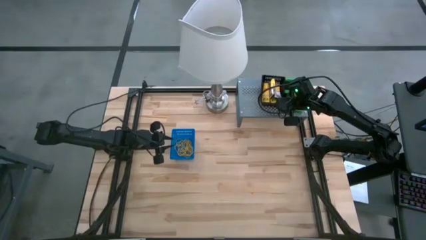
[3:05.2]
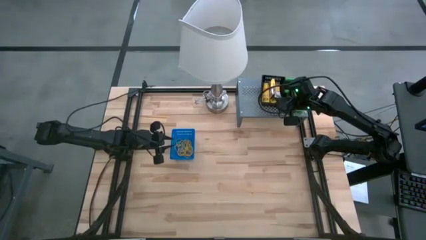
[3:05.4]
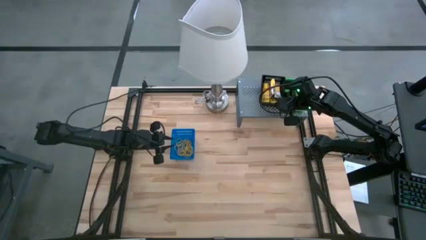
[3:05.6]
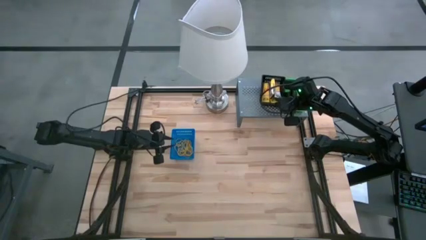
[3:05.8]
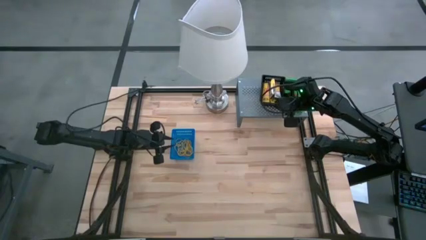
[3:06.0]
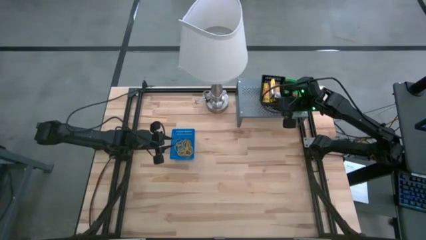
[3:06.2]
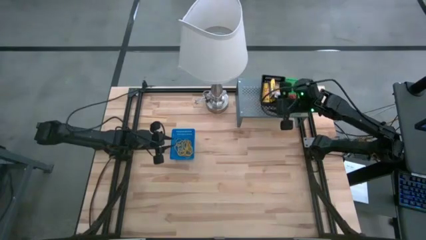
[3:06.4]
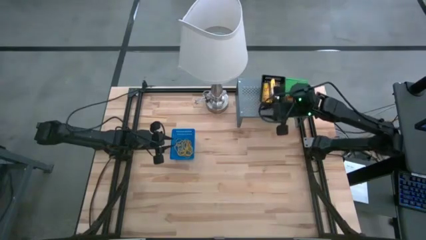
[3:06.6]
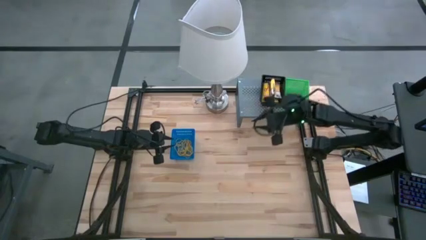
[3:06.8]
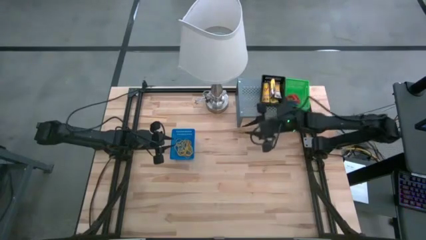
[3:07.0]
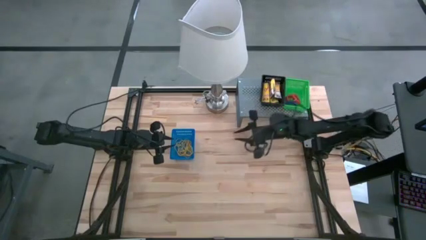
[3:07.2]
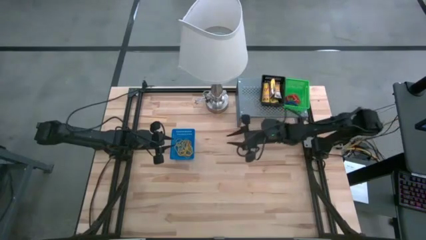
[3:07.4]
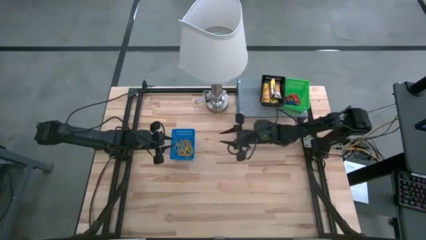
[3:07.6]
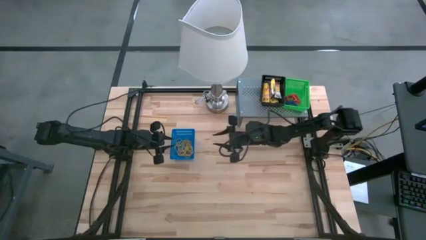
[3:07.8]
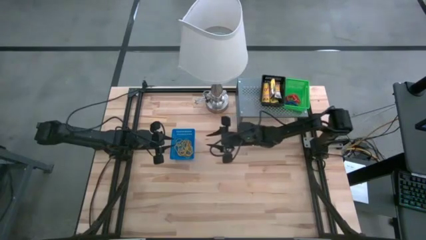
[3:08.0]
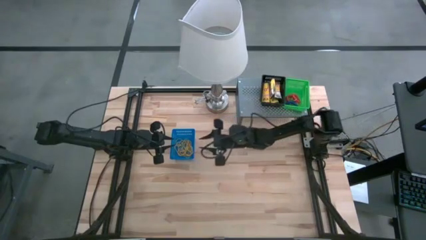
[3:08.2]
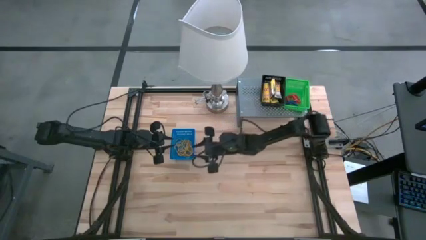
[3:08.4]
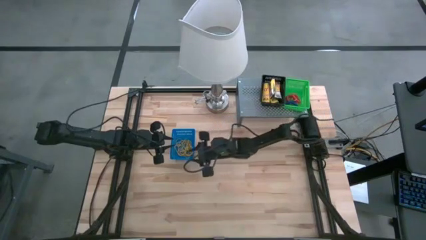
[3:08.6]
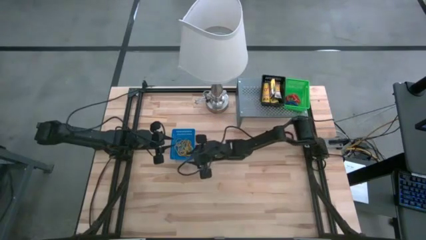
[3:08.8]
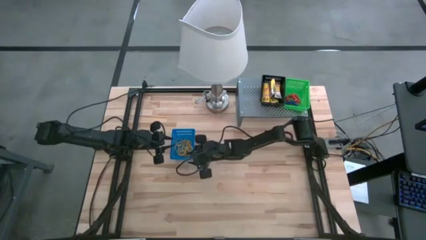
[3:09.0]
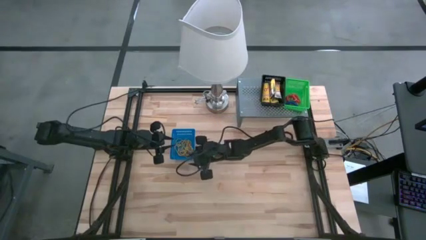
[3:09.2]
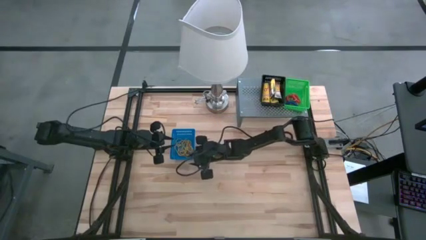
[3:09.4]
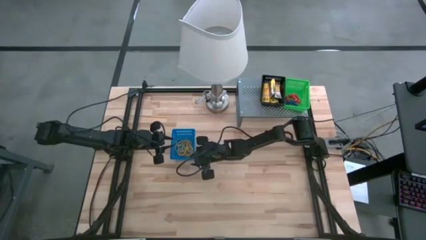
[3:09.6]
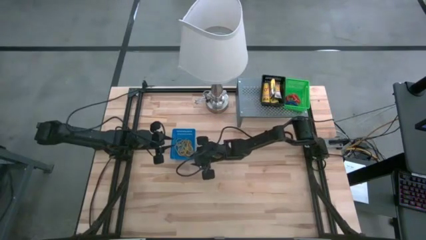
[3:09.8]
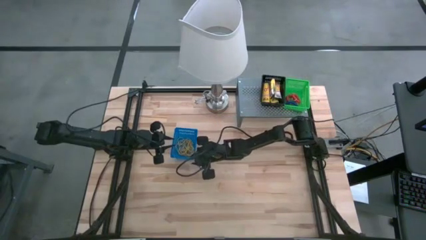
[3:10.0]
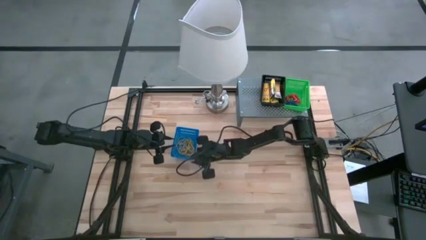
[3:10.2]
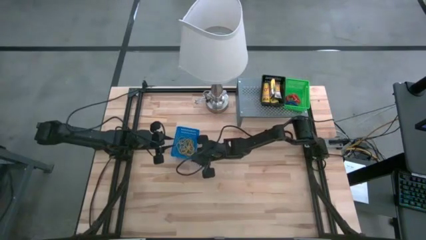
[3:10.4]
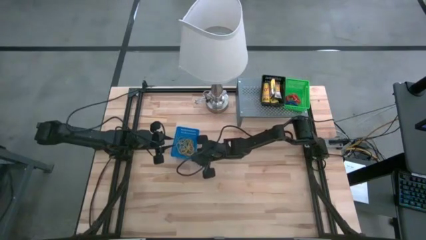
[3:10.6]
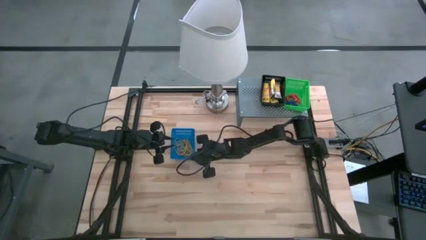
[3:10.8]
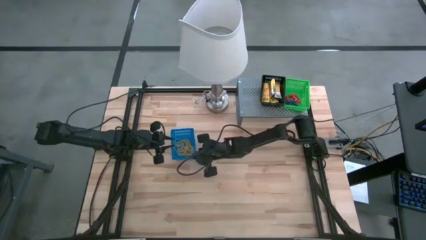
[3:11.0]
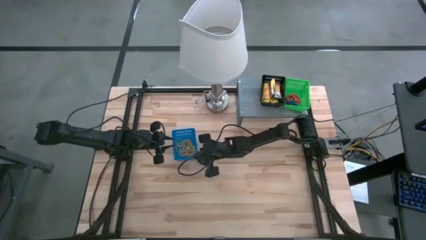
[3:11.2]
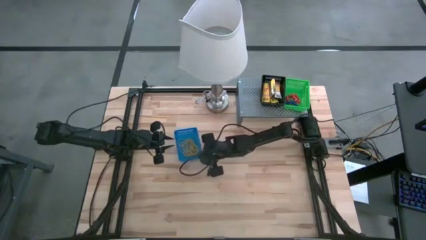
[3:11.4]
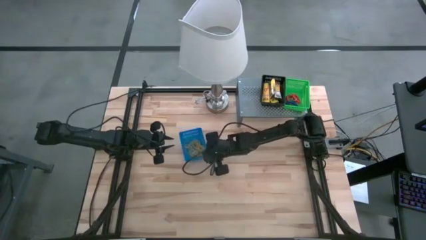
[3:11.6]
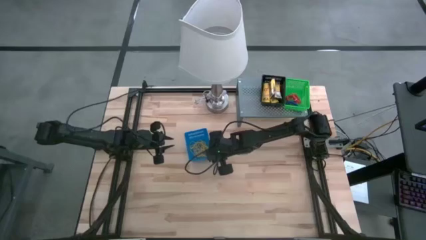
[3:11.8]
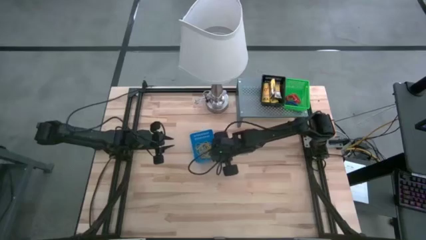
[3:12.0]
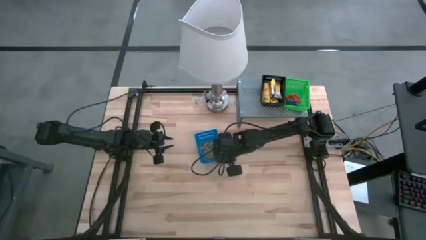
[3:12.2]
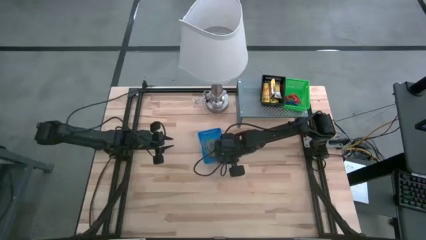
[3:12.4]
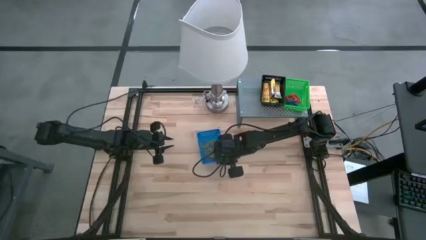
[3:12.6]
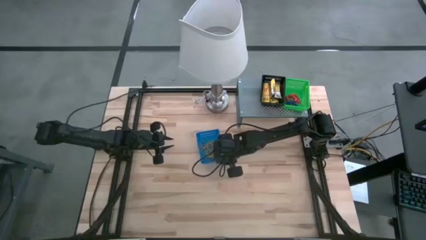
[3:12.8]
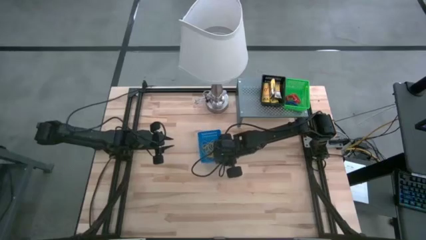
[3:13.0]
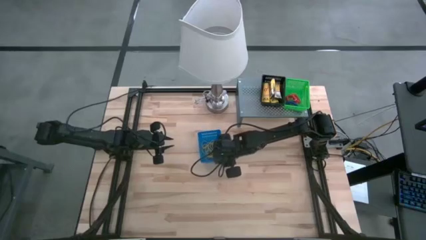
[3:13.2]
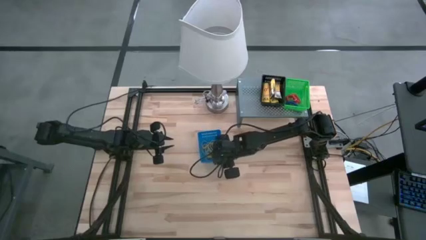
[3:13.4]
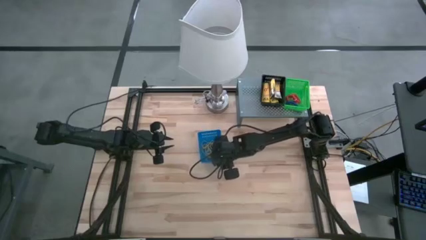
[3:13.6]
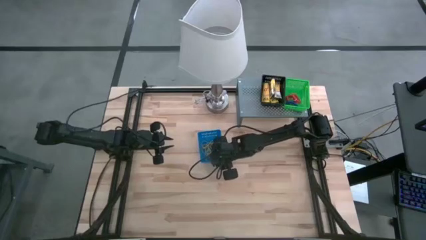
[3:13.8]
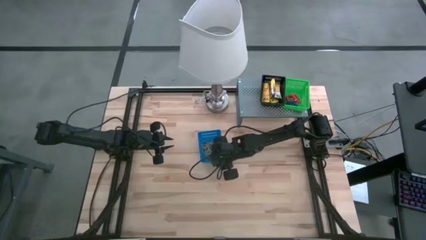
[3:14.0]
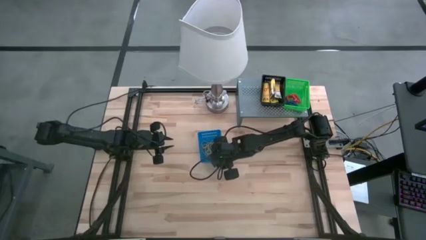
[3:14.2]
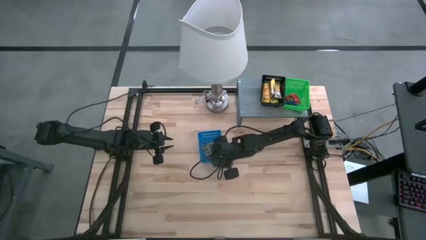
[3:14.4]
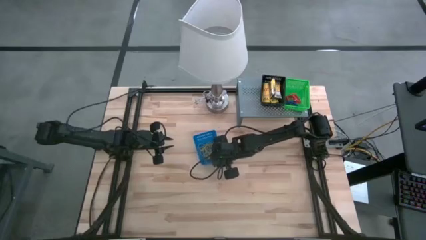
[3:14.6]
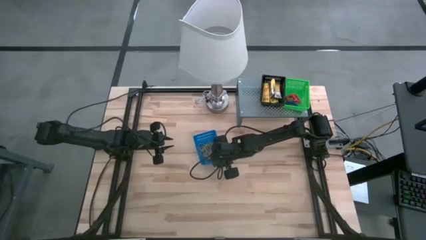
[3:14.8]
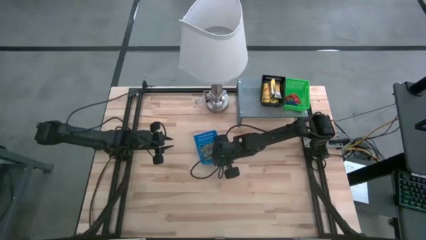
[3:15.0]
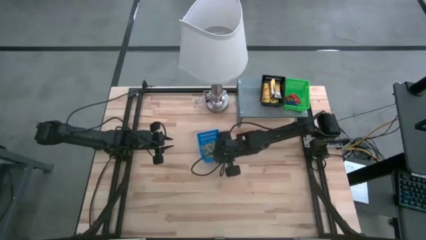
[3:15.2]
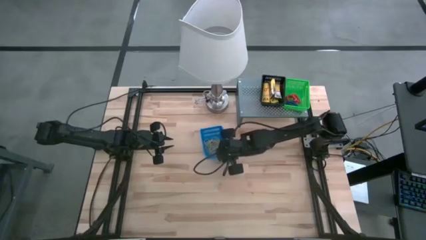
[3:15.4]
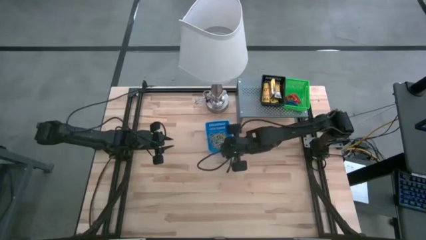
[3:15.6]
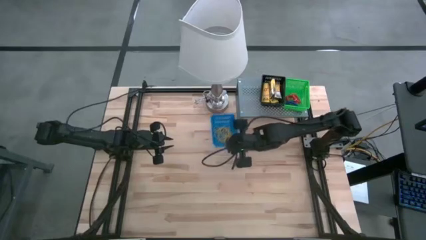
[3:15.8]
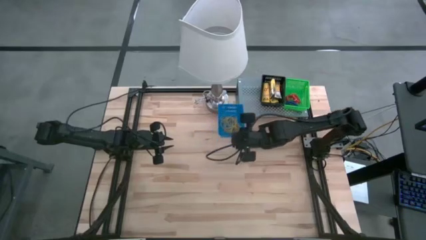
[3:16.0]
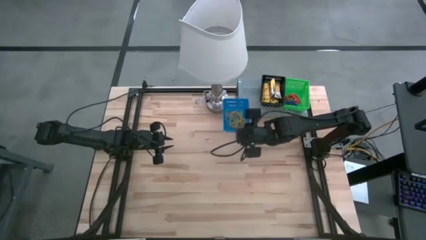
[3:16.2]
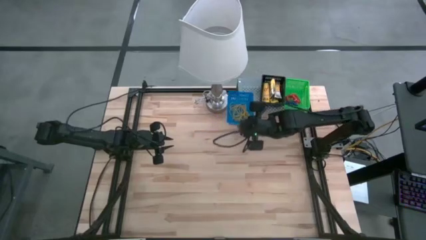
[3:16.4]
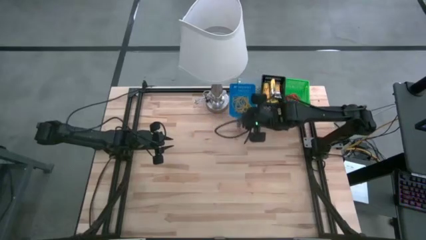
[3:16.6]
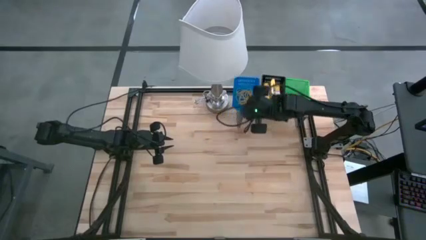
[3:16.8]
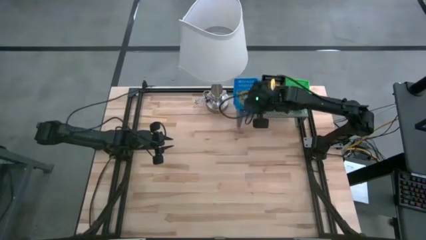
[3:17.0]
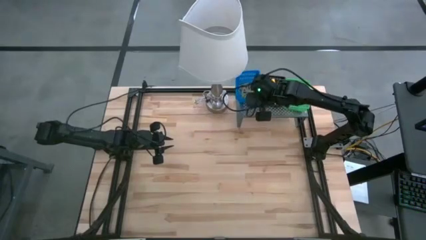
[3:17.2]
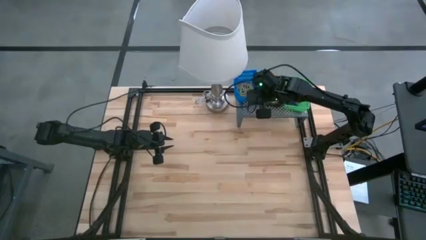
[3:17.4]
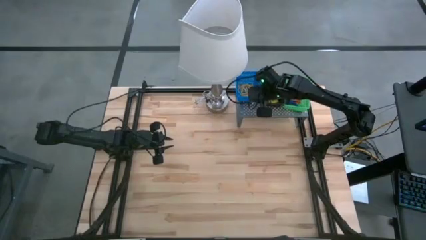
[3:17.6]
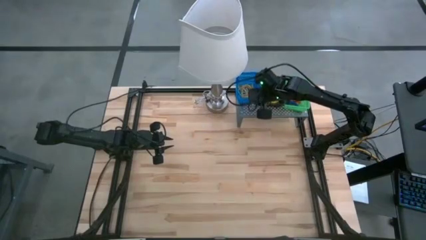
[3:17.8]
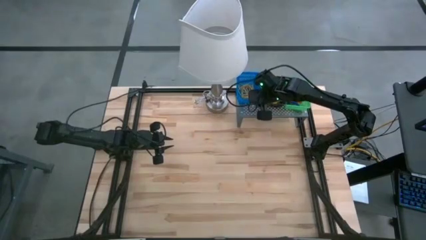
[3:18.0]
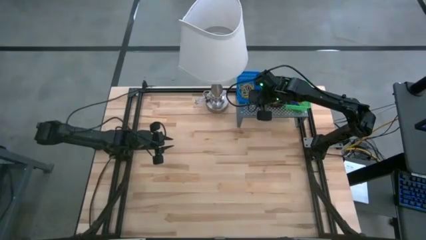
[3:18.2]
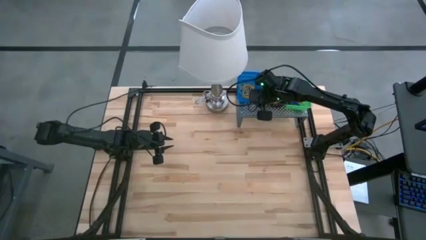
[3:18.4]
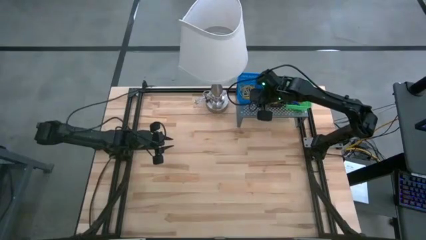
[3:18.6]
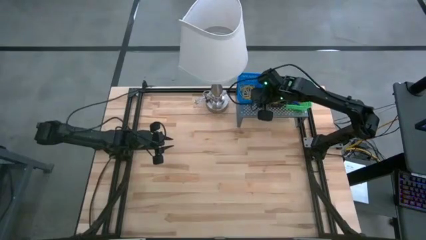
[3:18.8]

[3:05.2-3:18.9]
Task: Pick & Place Office Desk Supplies
Put the blue bin on the shelf

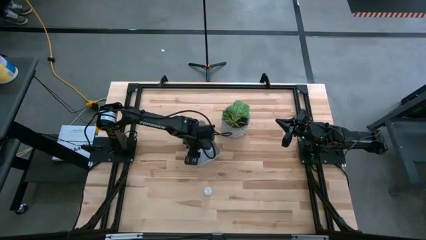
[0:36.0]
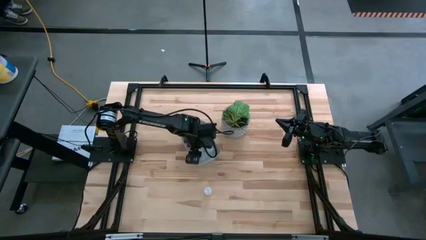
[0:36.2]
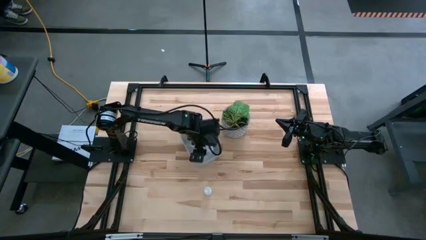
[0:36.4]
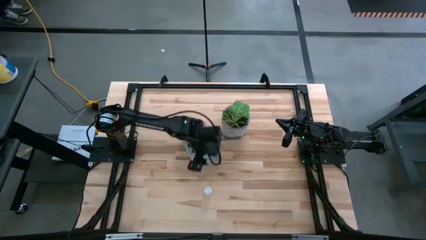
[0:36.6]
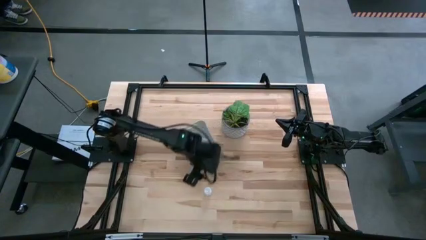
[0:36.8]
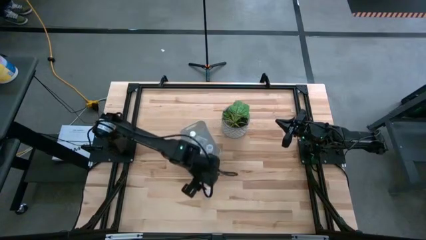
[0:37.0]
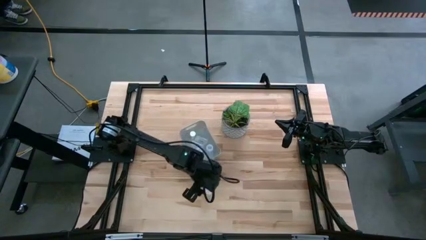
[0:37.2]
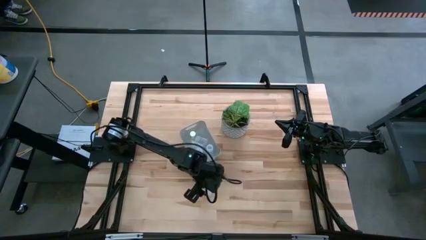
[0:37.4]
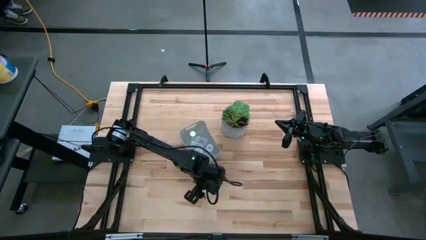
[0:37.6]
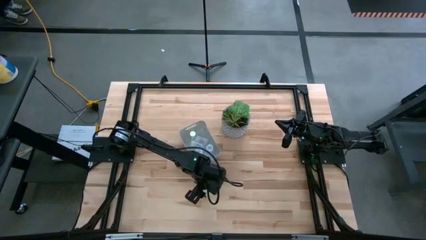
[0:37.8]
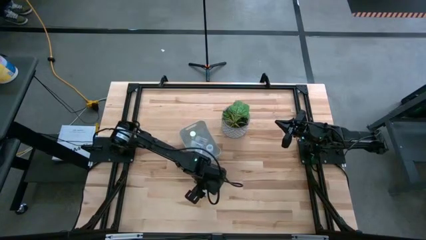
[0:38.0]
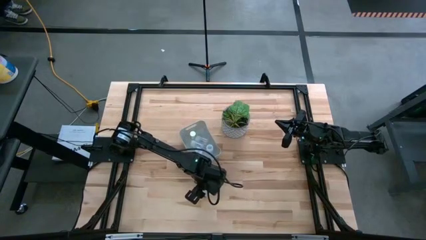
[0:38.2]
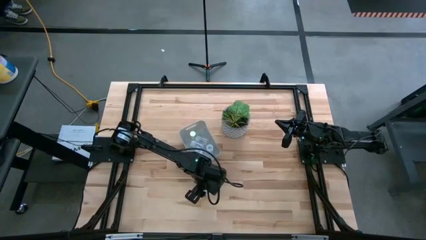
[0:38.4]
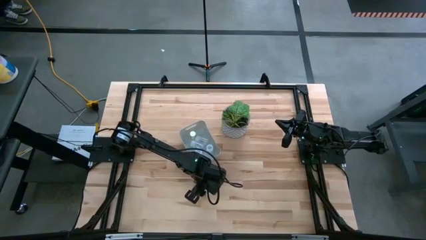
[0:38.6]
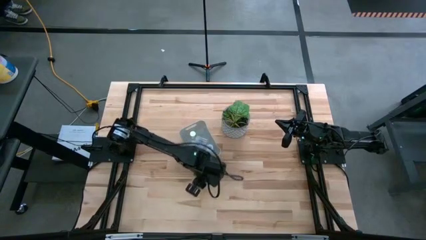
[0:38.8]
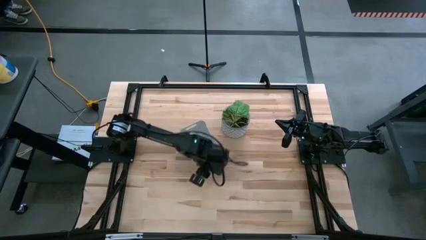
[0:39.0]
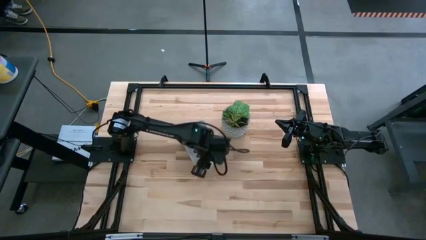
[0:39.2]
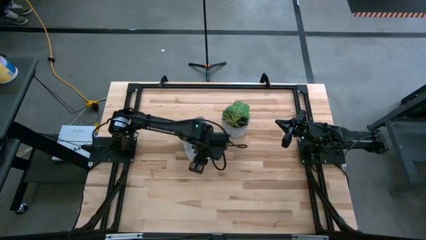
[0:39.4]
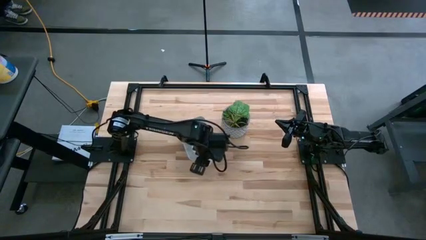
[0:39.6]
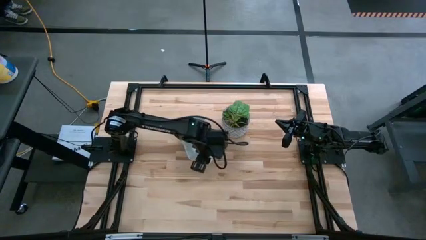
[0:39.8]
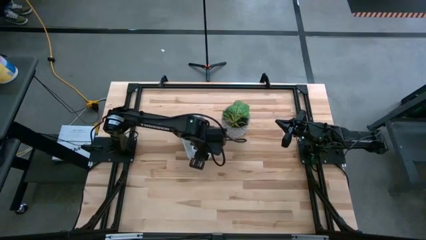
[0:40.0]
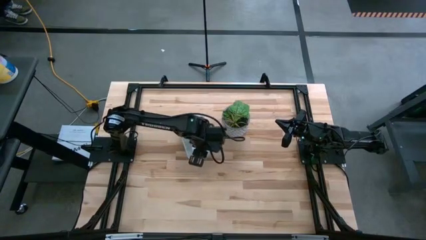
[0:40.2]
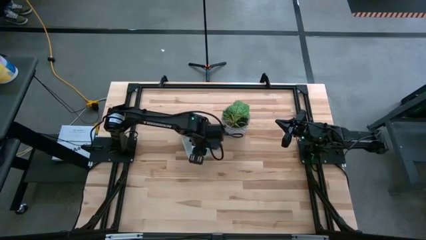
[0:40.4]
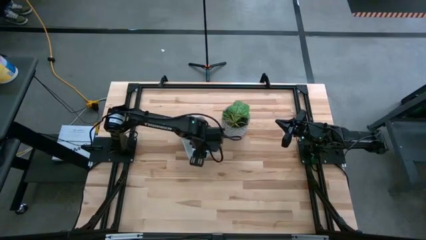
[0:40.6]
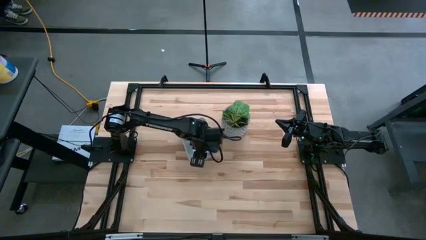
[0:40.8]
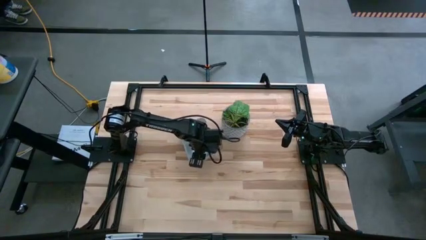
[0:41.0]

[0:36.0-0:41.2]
Task: Pick and place pill bottles into a basket
Put the white pill bottle into the white bin
